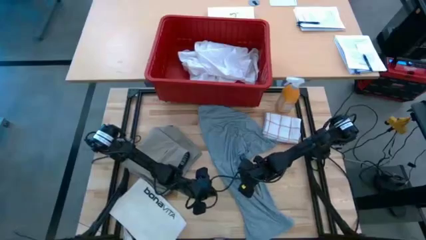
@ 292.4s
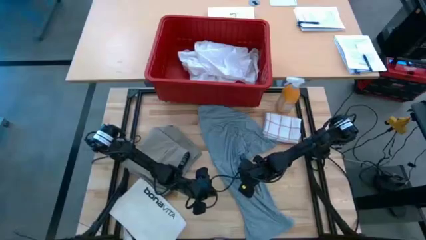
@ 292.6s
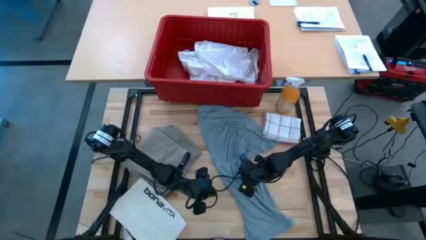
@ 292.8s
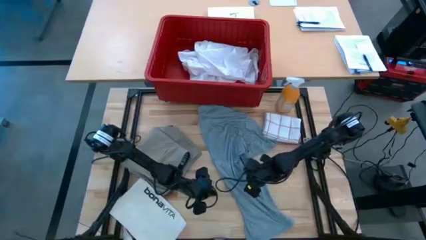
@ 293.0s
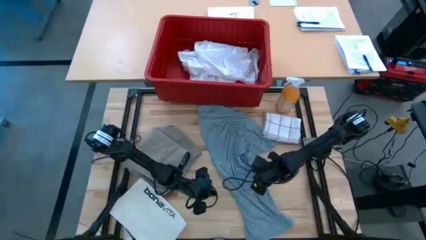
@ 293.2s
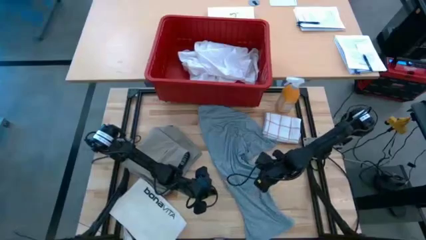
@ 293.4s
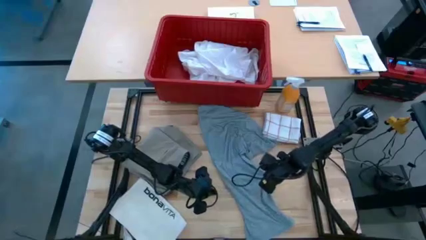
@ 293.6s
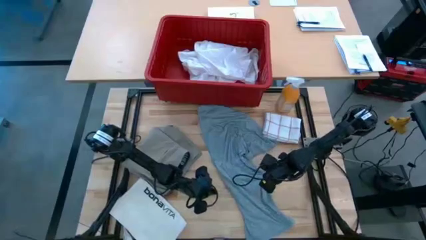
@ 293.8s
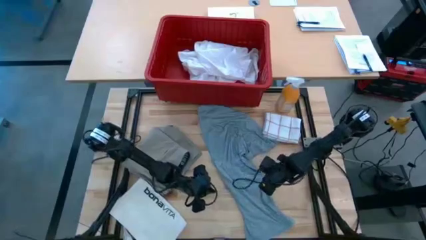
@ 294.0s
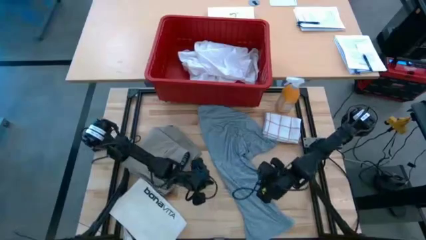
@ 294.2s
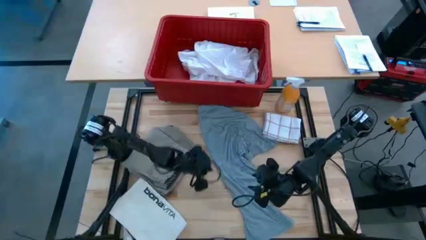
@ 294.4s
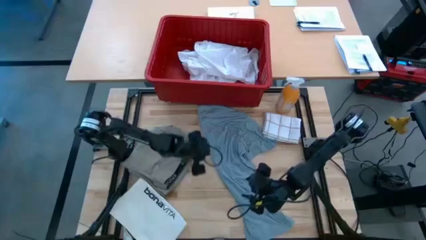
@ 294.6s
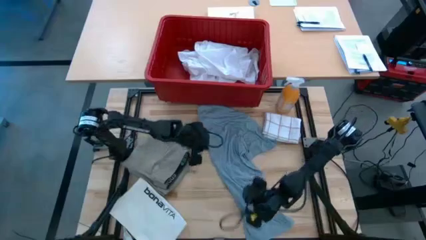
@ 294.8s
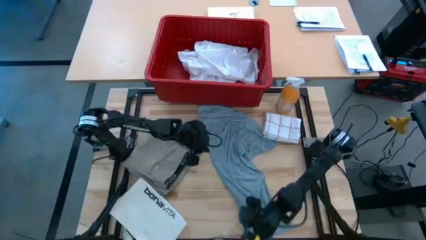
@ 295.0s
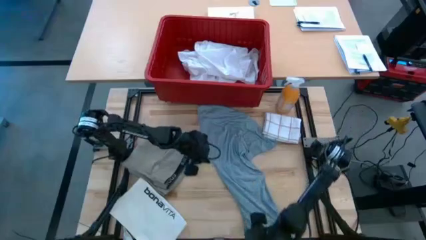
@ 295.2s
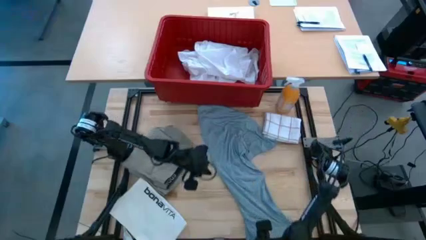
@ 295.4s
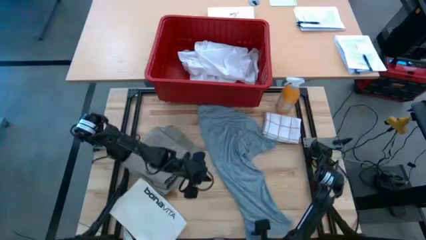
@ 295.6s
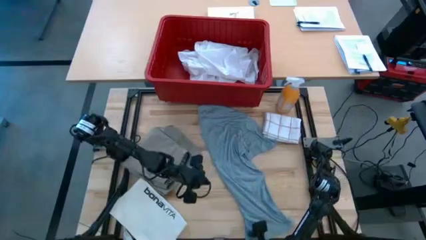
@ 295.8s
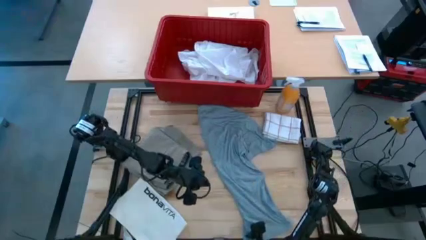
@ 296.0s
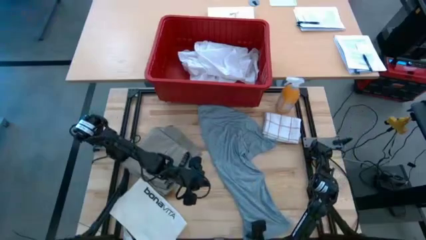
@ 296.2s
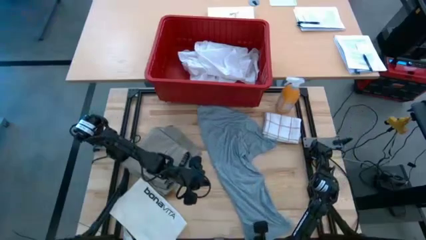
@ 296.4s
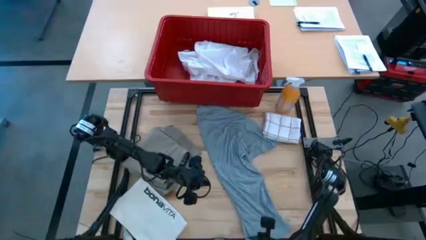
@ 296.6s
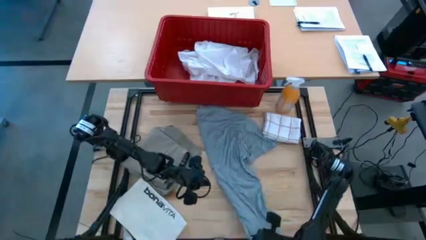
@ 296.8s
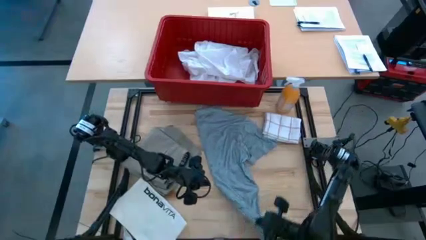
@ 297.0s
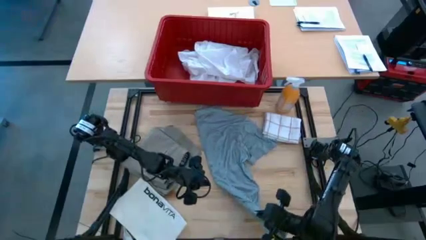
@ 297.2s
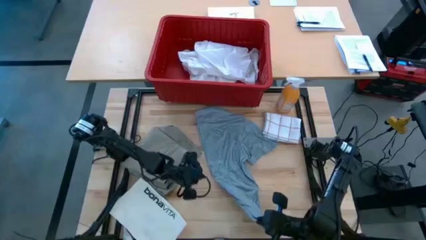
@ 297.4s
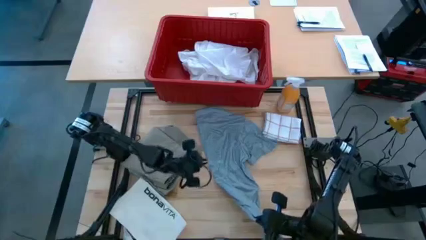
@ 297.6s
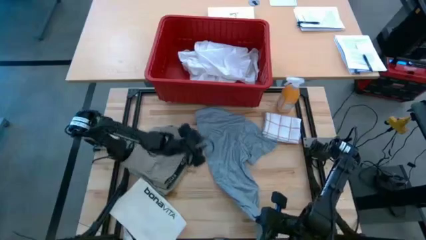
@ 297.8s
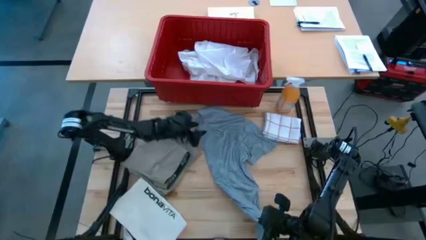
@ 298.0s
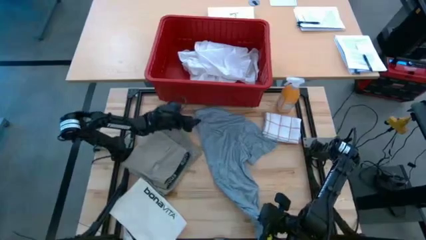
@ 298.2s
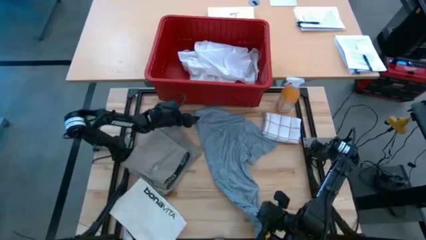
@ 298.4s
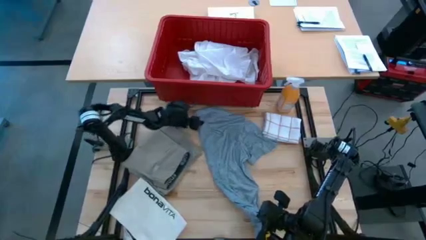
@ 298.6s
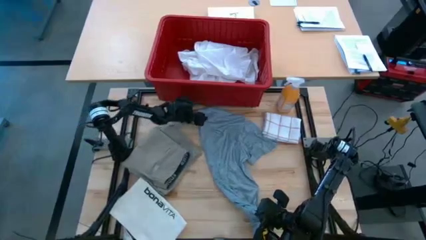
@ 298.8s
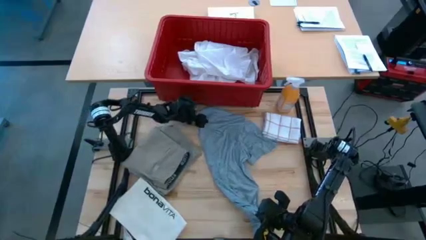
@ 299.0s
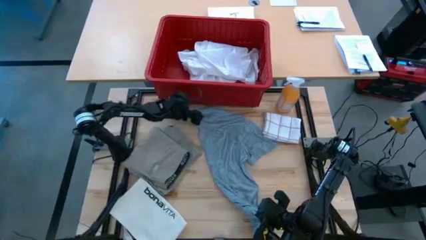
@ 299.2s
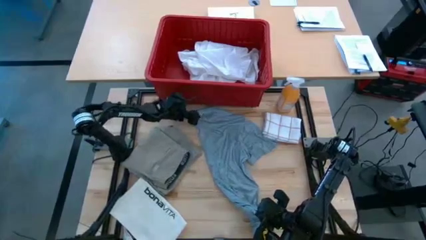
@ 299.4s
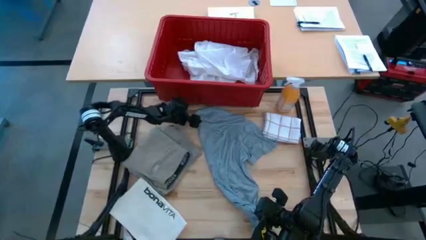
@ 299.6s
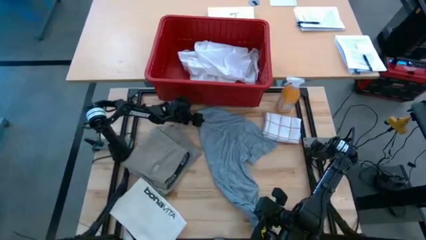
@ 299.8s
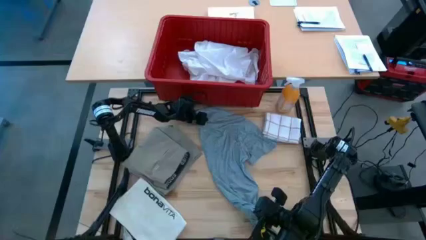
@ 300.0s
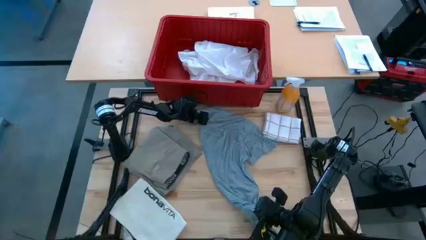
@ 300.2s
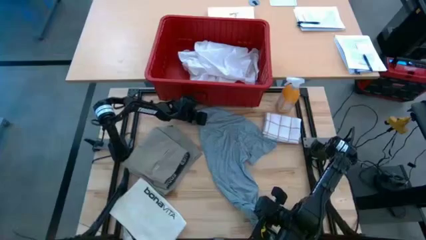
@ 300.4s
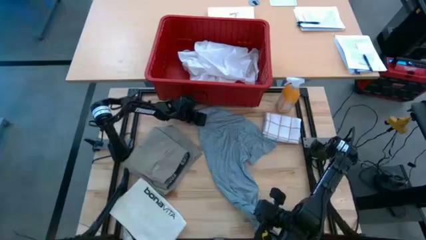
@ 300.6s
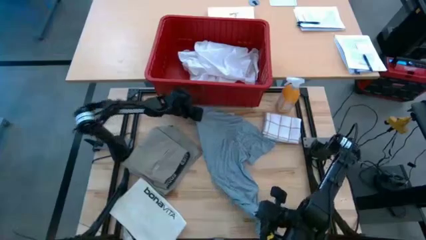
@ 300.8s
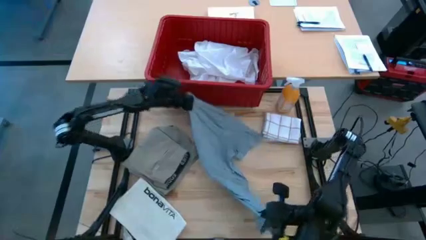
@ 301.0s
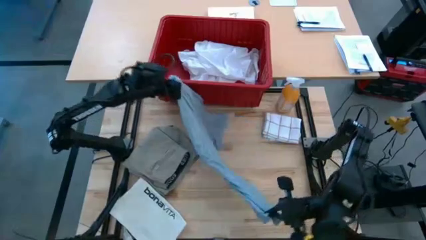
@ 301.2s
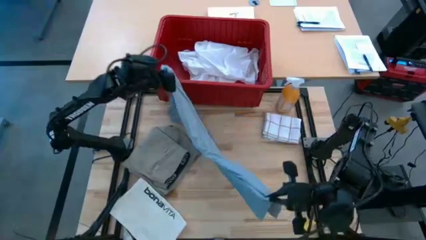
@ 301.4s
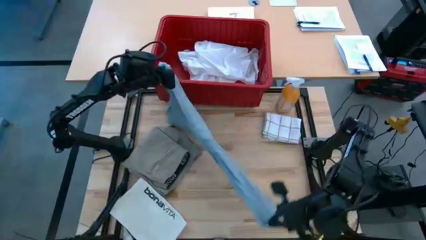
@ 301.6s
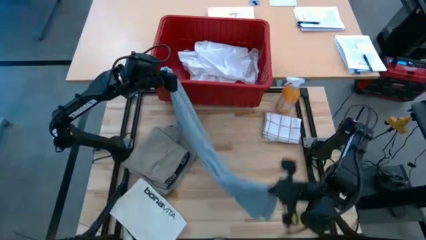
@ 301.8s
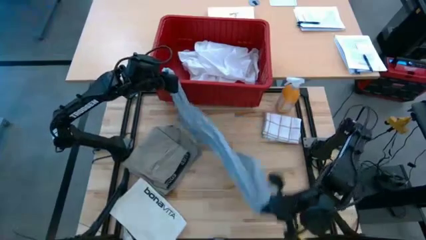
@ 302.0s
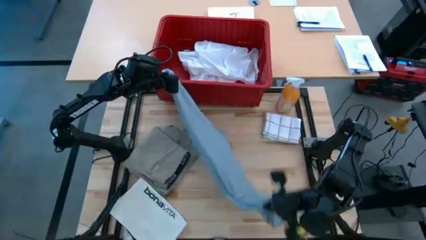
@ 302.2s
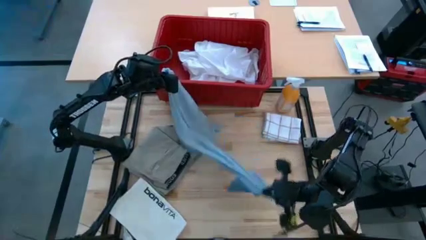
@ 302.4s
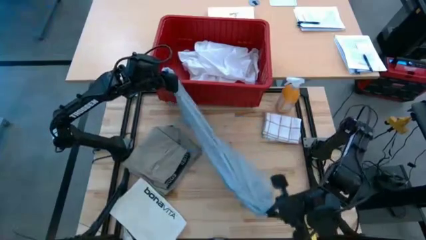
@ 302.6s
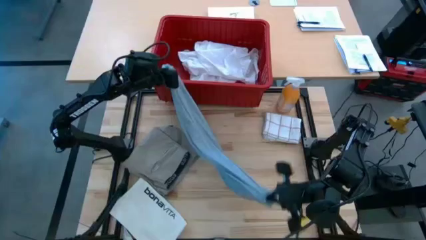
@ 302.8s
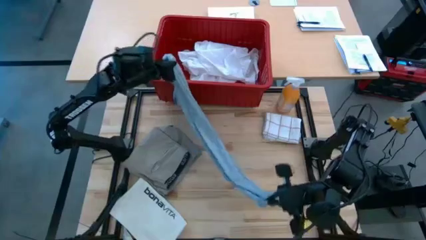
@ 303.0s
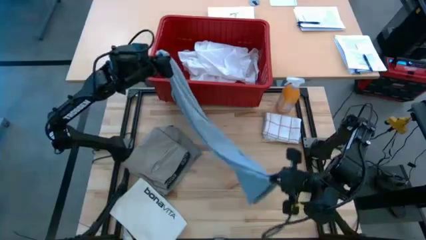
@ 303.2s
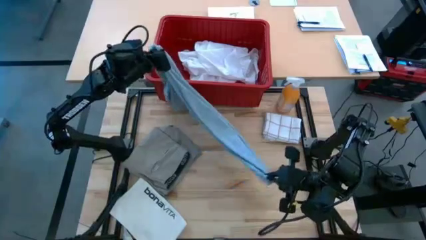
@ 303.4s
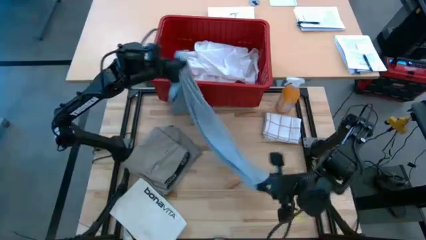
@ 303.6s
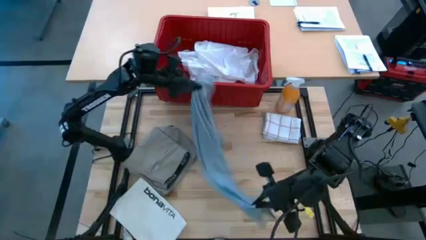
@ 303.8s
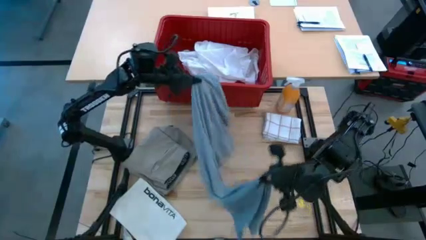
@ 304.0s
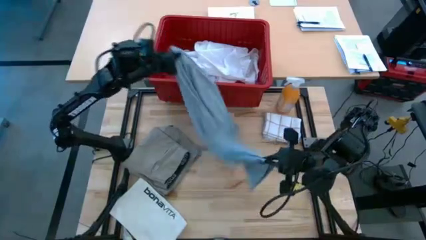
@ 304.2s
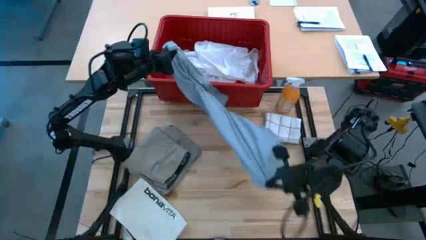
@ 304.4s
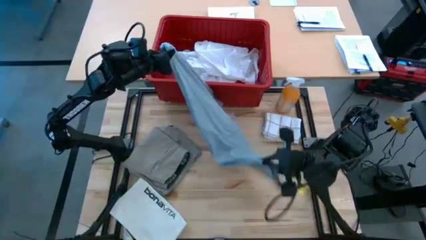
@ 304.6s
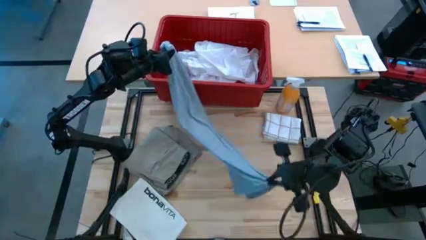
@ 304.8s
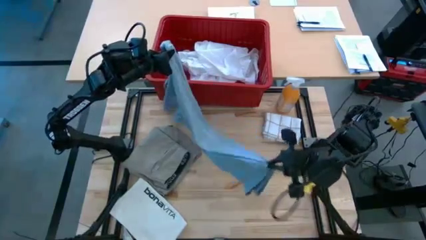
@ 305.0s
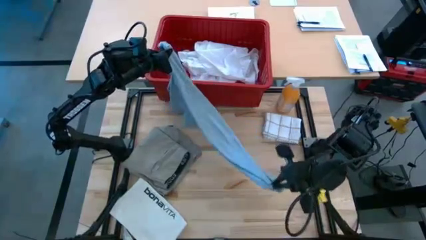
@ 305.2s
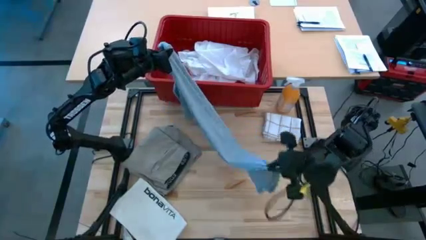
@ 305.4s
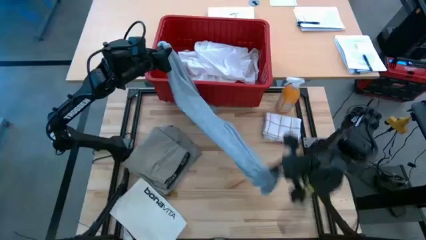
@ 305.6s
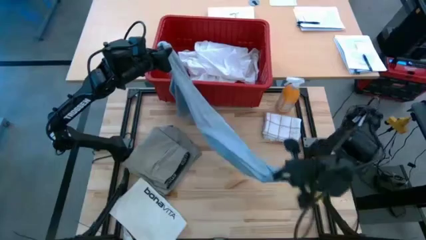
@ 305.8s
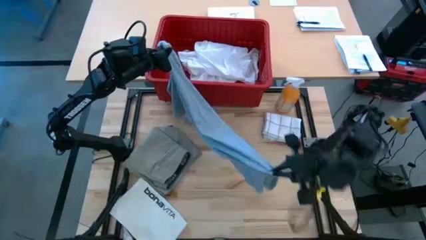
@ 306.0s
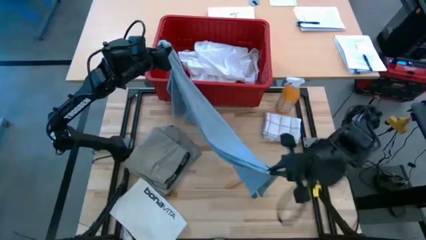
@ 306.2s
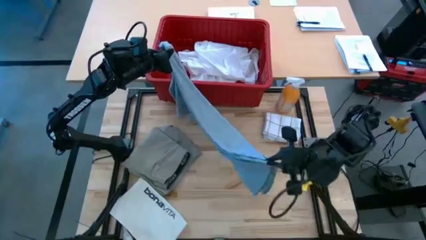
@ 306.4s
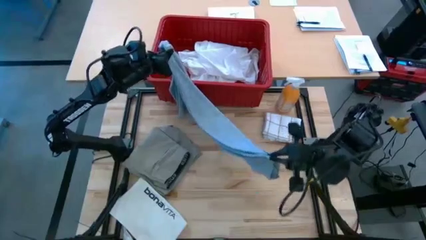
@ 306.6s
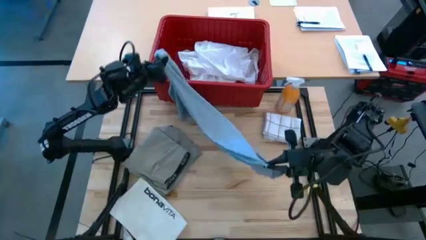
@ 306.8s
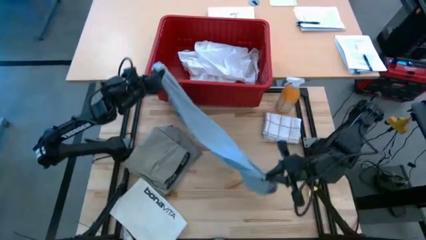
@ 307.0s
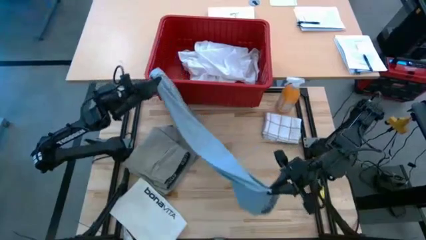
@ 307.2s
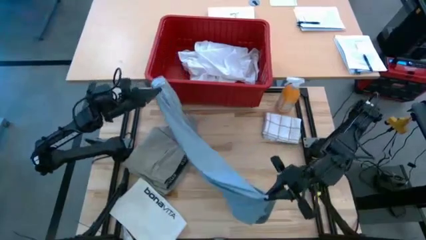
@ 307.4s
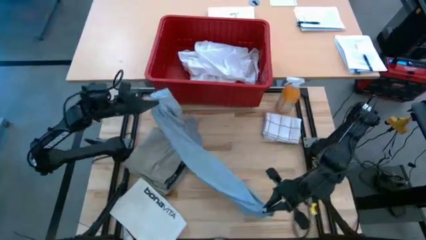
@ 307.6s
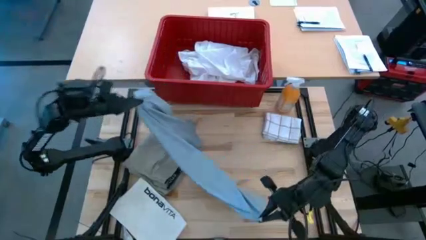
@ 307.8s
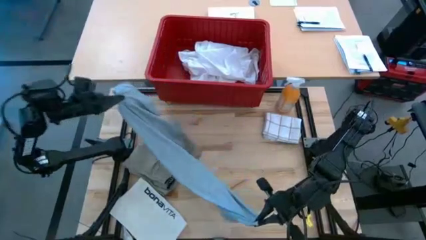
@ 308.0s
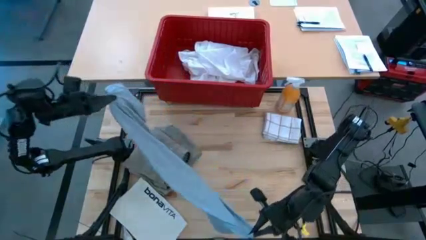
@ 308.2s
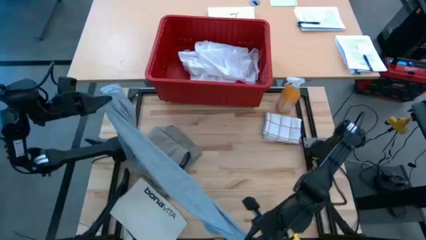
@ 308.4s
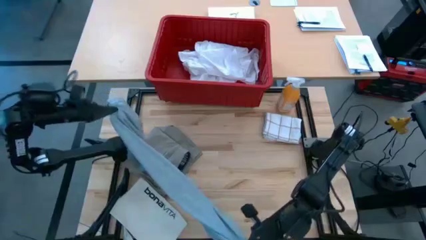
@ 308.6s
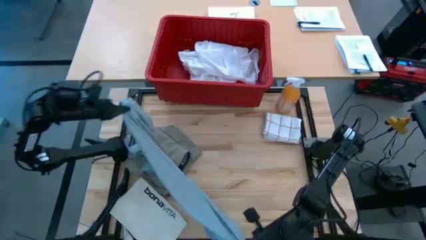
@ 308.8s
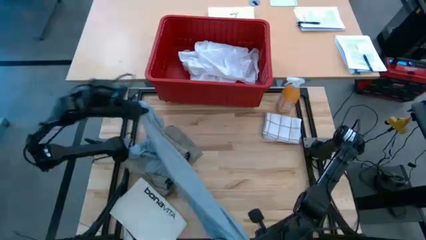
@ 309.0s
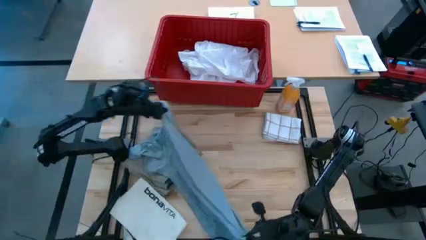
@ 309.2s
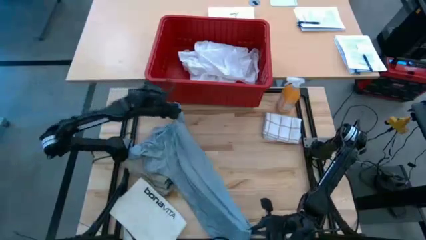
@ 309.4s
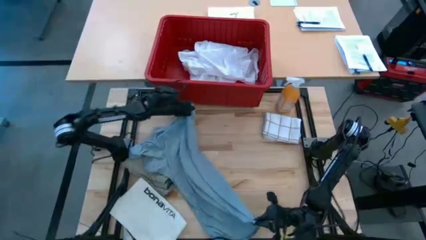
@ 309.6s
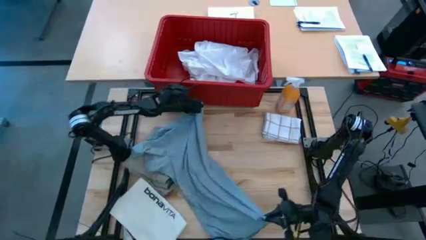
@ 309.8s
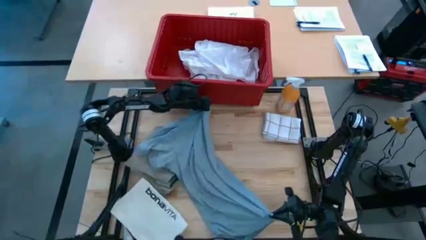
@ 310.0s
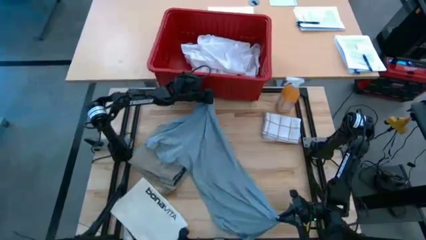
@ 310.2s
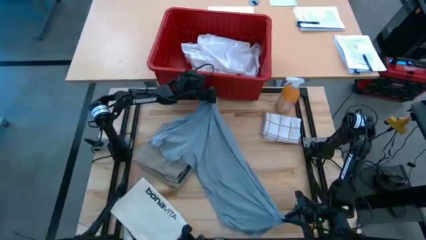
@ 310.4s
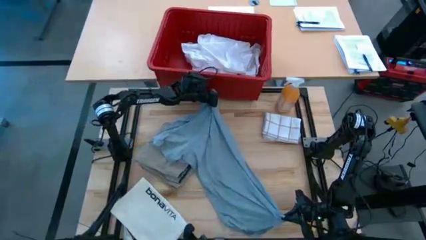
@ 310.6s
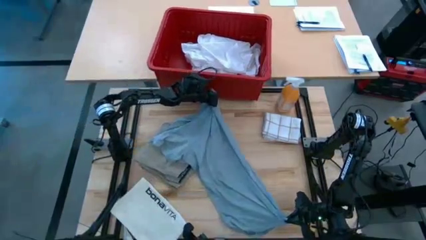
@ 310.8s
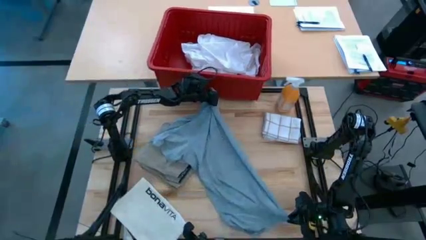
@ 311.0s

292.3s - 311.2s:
Task: Fold laundry
Fold the gray shirt
